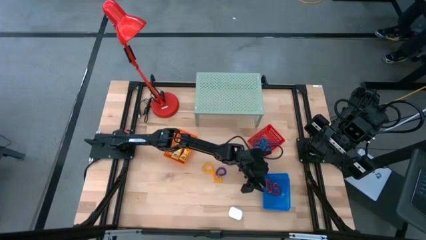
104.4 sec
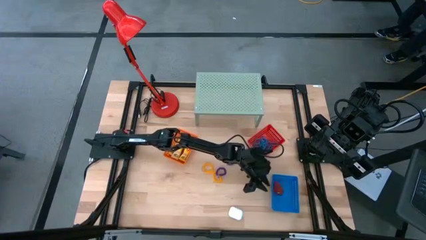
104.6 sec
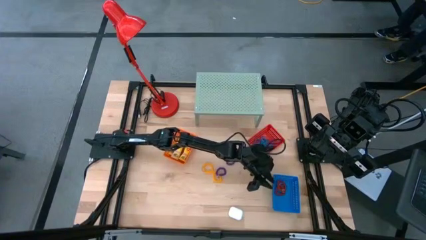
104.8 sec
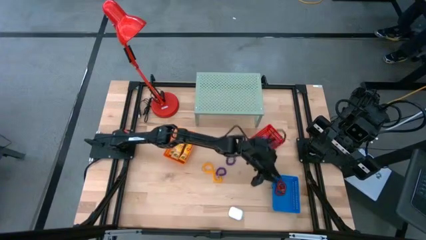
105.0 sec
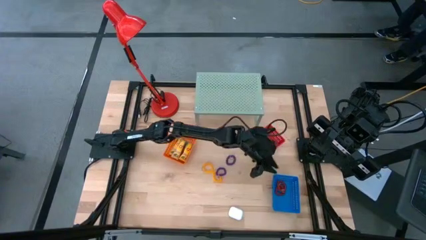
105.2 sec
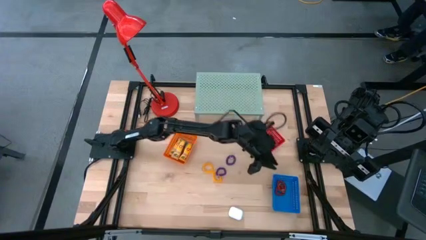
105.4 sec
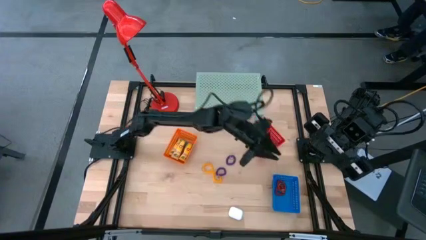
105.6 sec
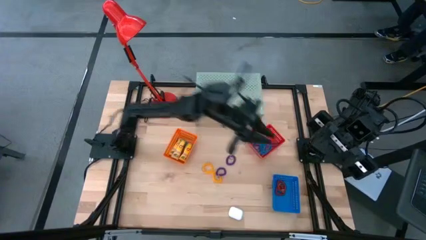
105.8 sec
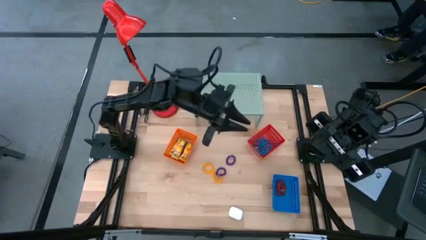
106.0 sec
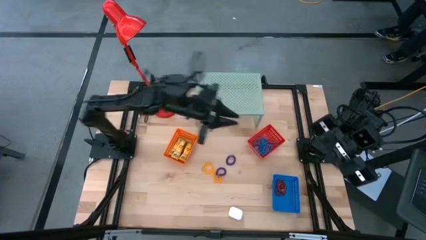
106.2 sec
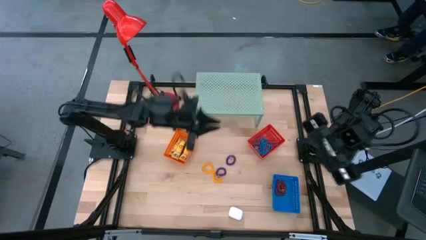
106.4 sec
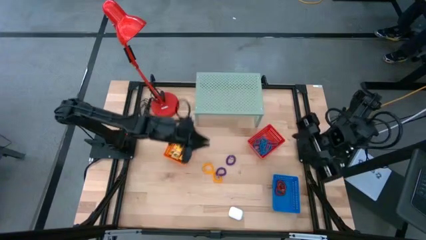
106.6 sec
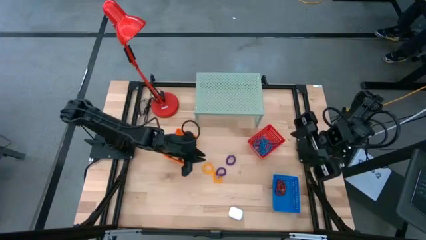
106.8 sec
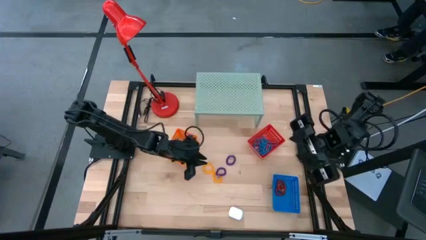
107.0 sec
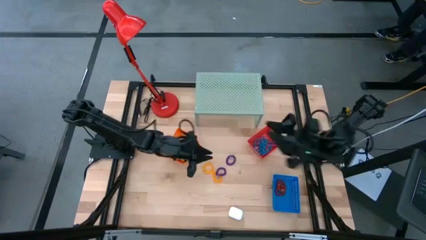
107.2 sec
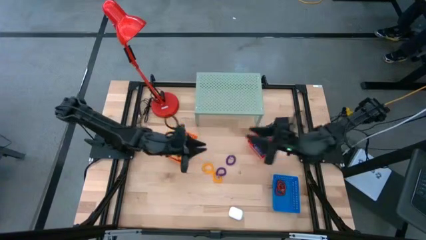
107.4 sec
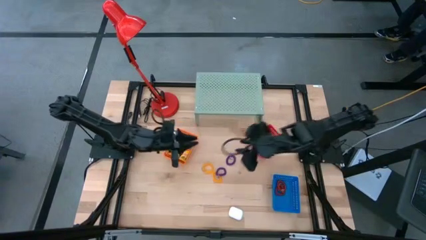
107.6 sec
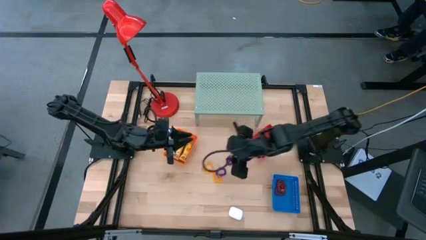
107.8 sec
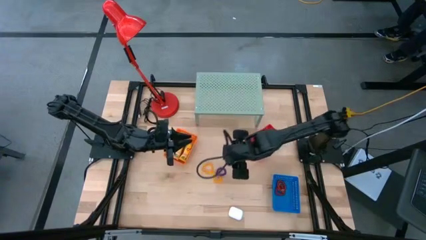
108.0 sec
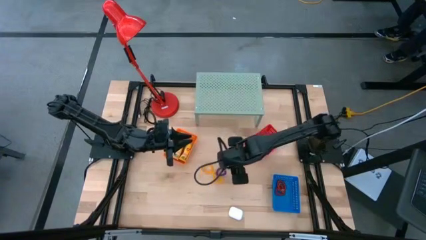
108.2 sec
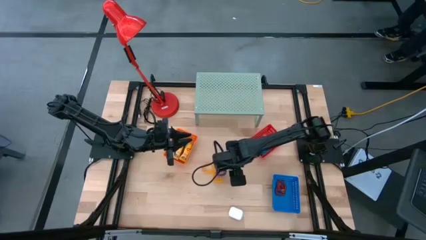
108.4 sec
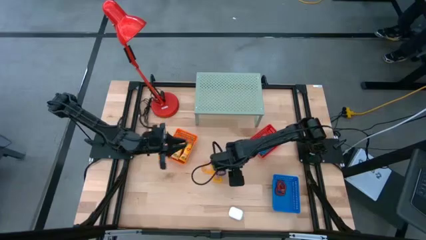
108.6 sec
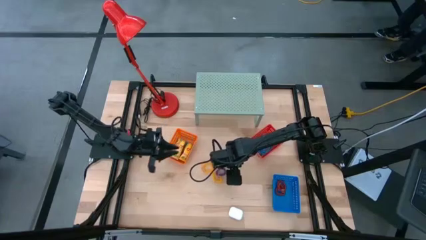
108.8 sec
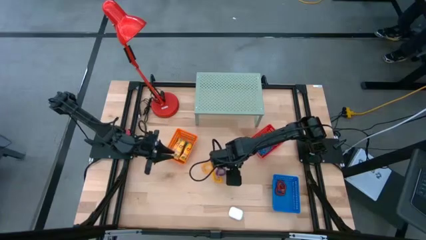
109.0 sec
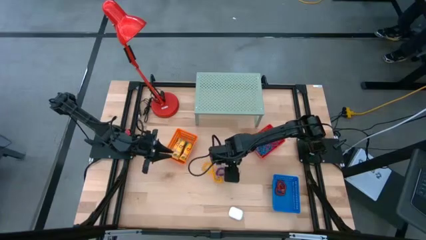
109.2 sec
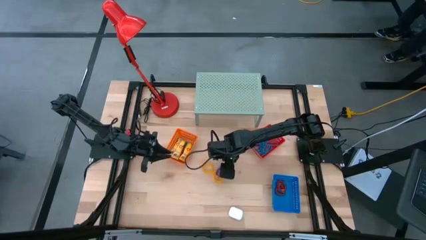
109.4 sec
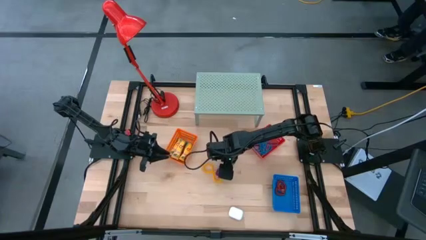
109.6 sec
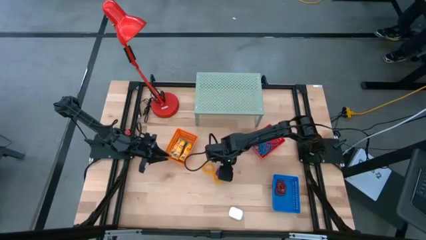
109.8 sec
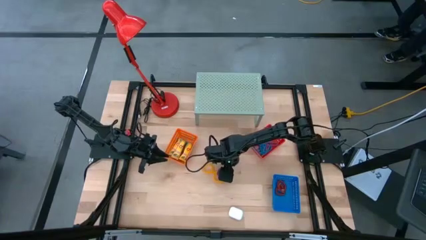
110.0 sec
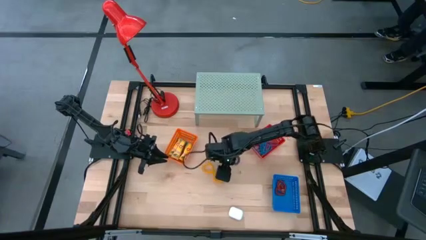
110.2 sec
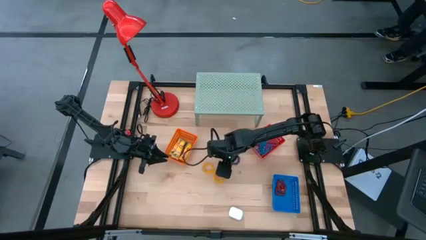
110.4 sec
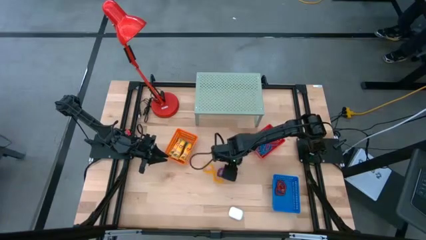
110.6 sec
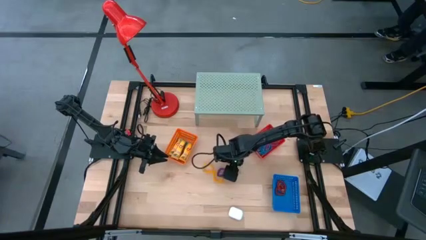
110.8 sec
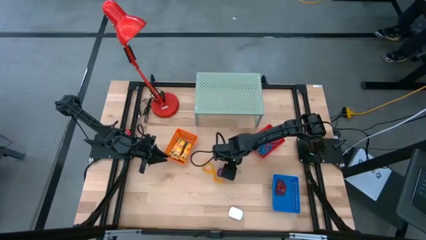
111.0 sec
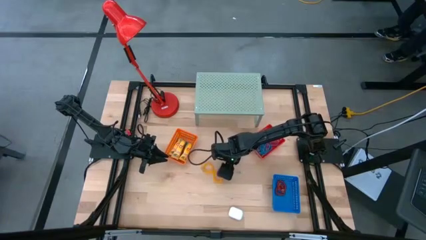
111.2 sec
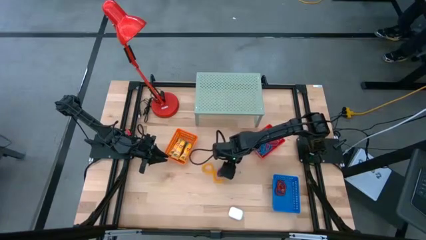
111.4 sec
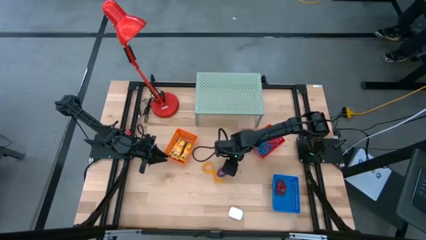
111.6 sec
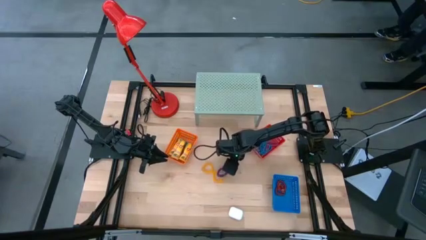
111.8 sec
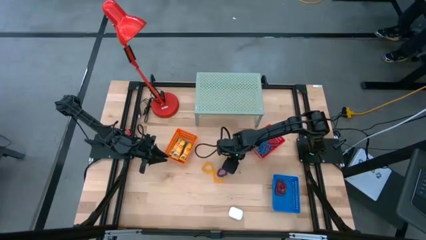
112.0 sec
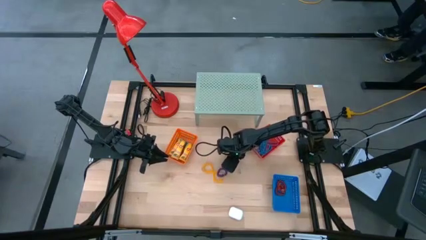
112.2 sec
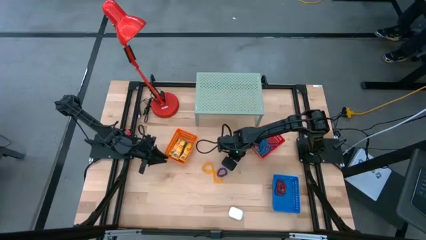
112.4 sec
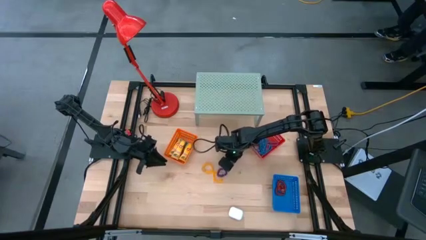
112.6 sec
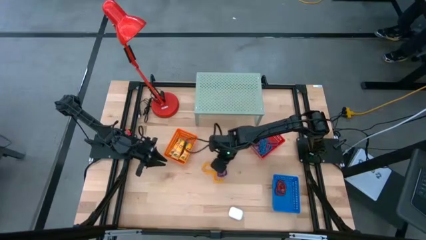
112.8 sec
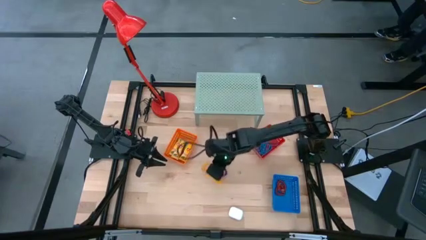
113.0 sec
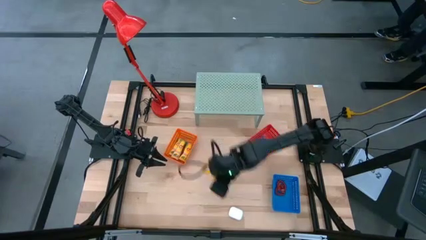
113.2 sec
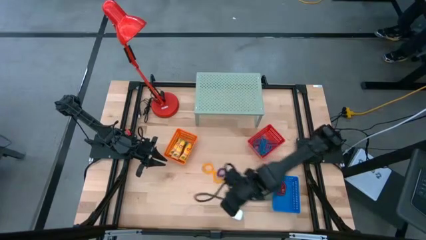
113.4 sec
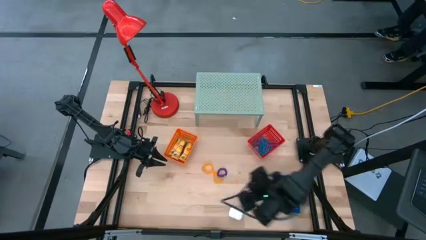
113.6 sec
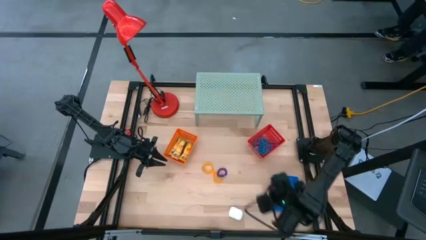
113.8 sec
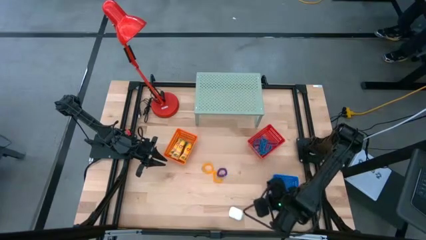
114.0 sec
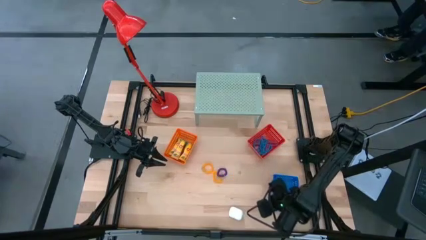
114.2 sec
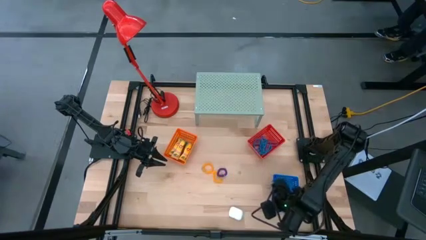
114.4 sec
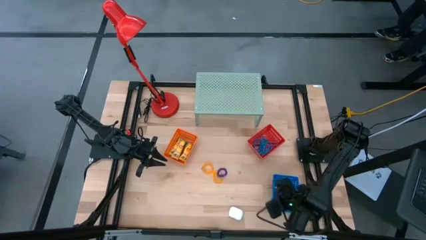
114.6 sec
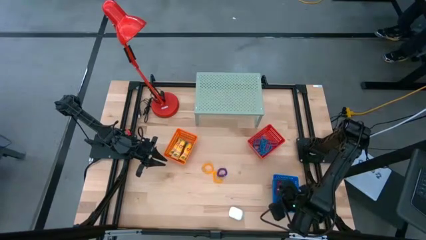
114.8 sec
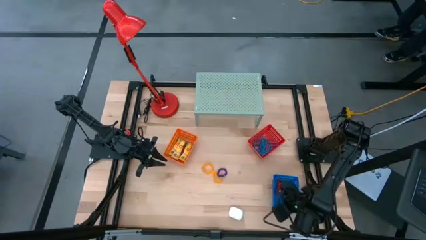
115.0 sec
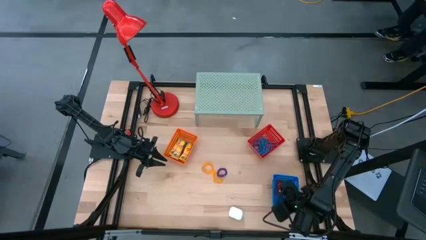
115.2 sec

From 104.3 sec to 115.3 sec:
Task: Pick & Place Office Desk Supplies
Put the violet spring keychain into the blue bin

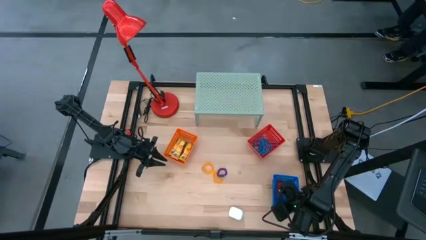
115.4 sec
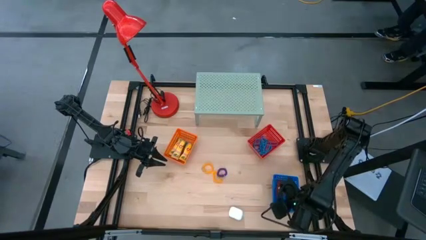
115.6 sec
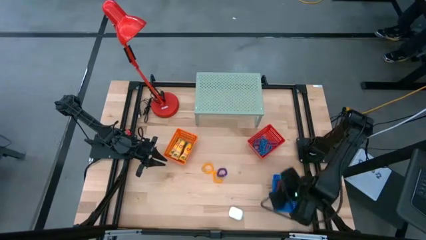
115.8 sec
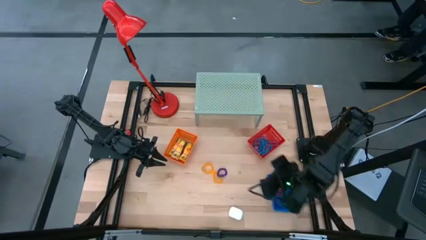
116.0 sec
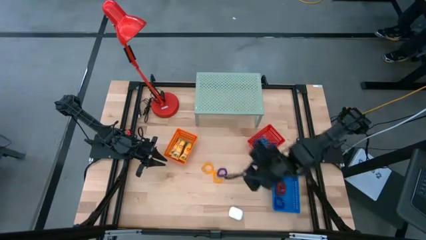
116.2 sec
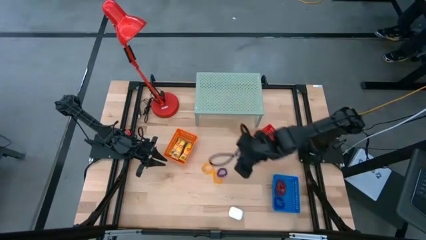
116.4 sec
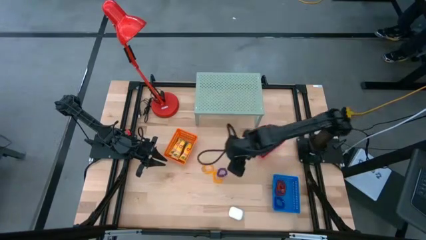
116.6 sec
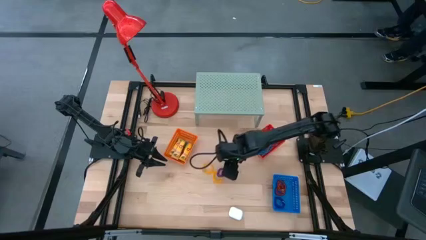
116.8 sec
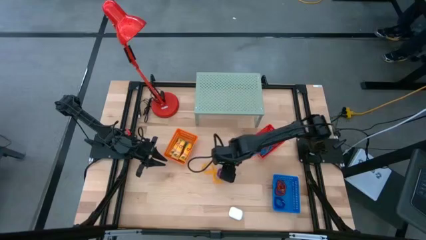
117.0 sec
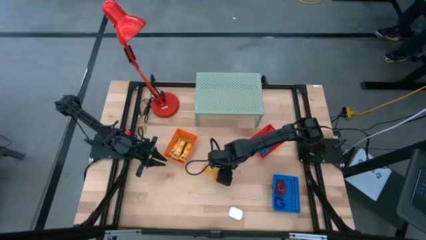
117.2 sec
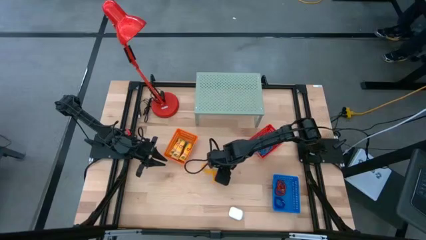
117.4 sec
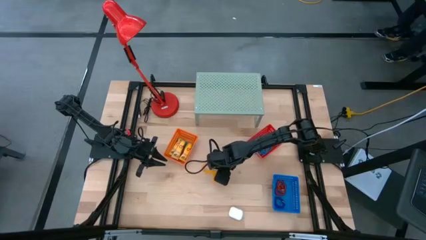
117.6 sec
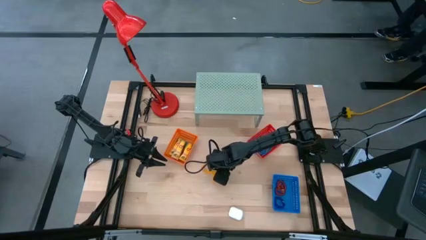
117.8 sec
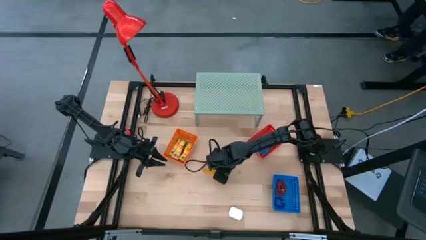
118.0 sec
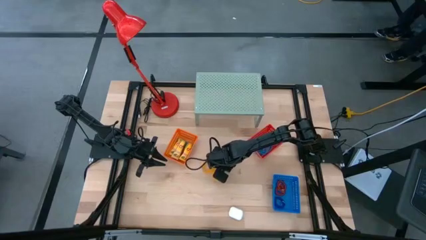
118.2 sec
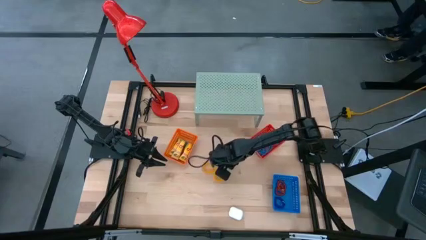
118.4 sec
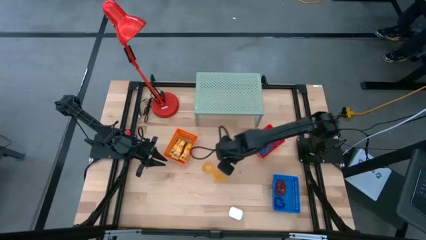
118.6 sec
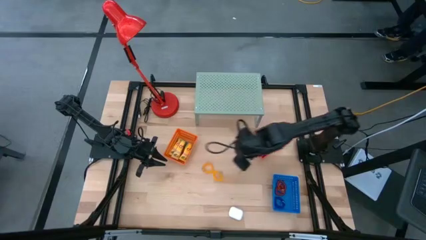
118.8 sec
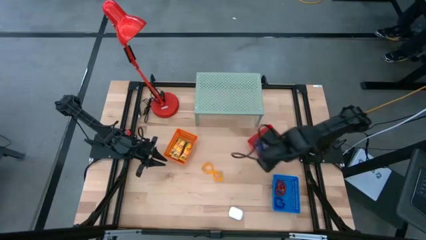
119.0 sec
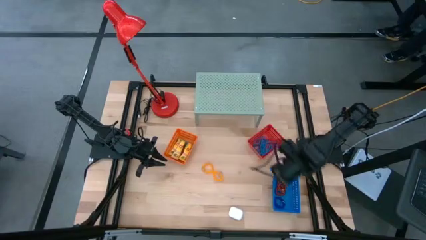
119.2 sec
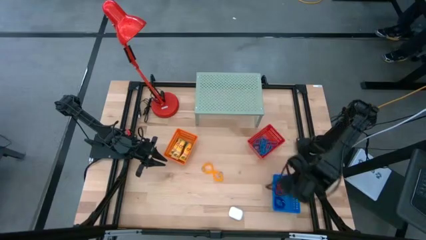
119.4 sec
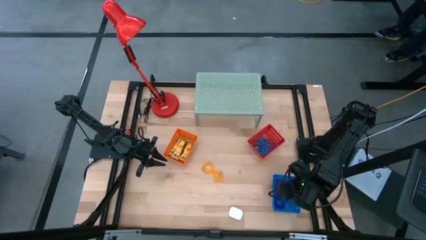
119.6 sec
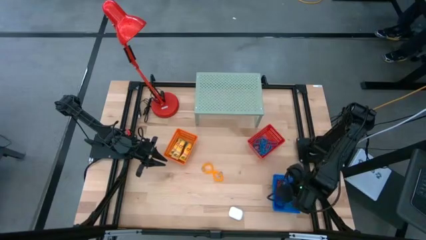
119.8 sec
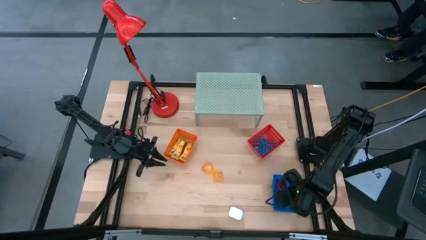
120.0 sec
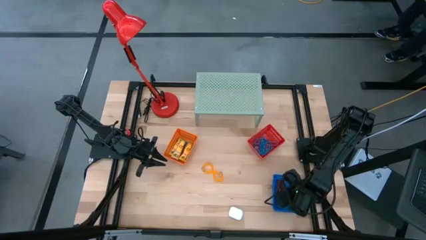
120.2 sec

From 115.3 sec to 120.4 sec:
Put the violet spring keychain into the blue bin
